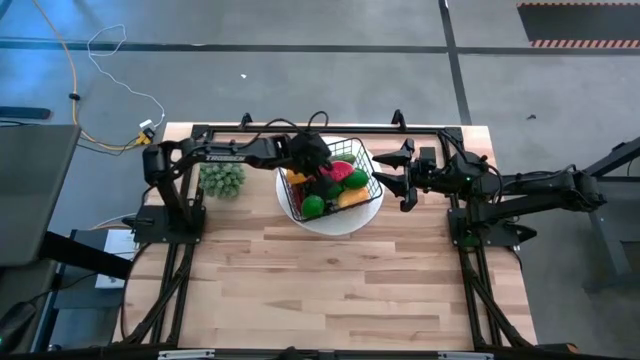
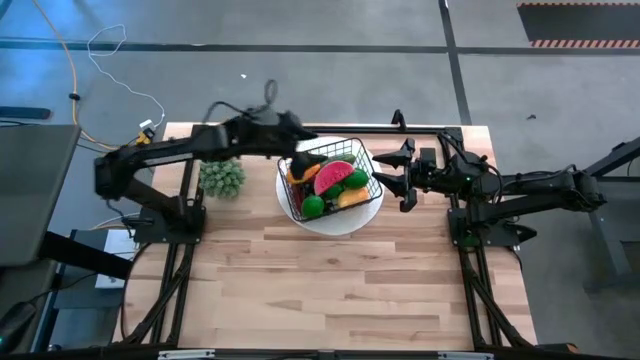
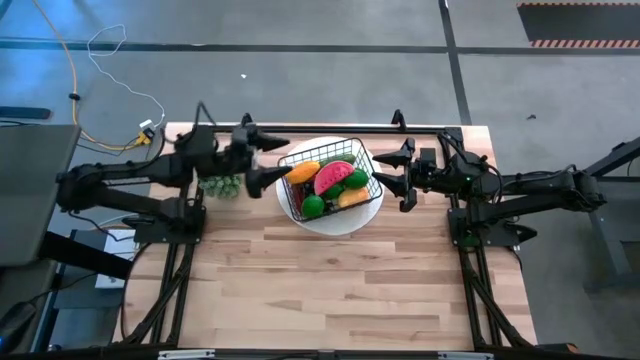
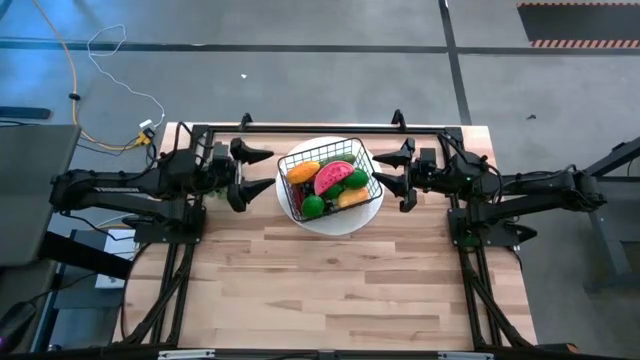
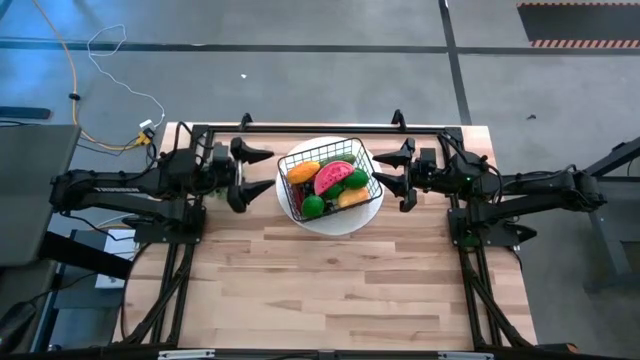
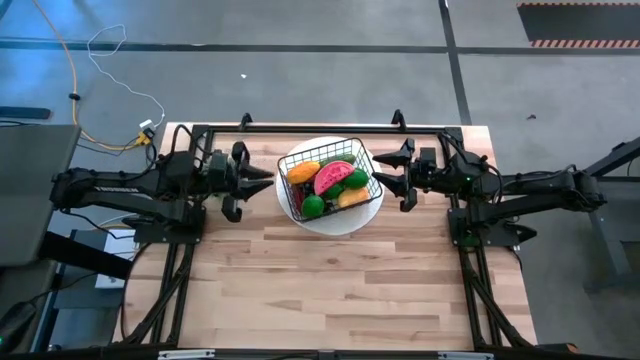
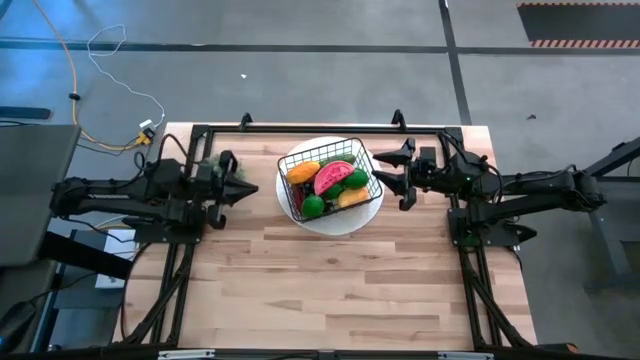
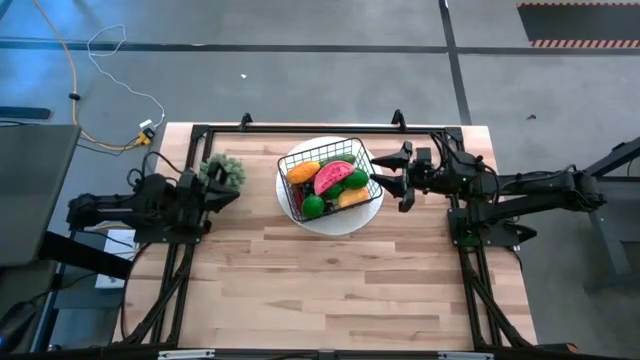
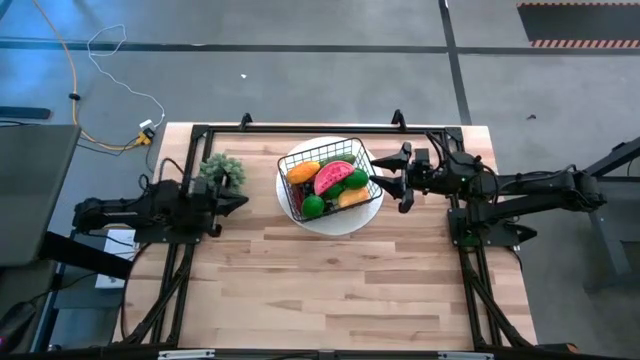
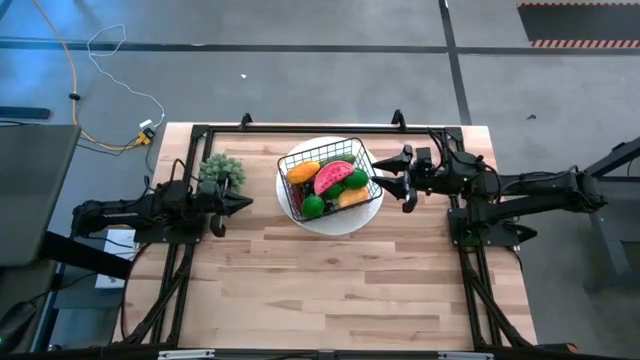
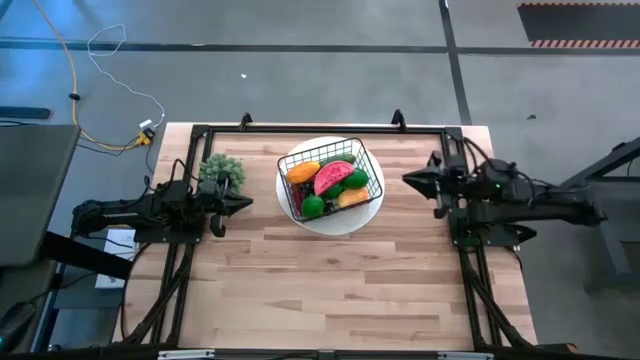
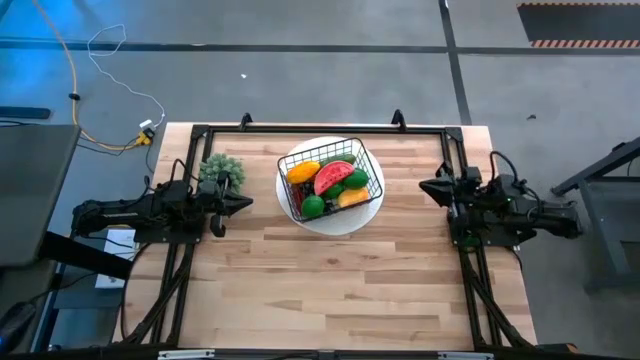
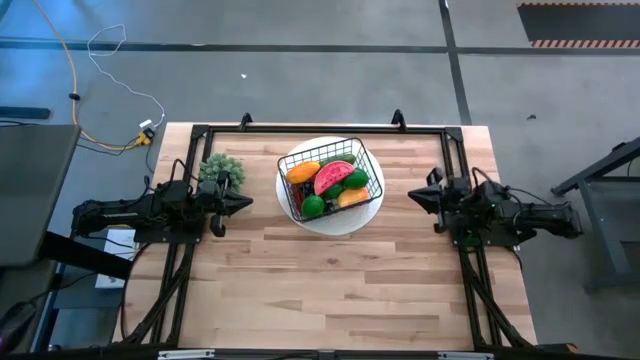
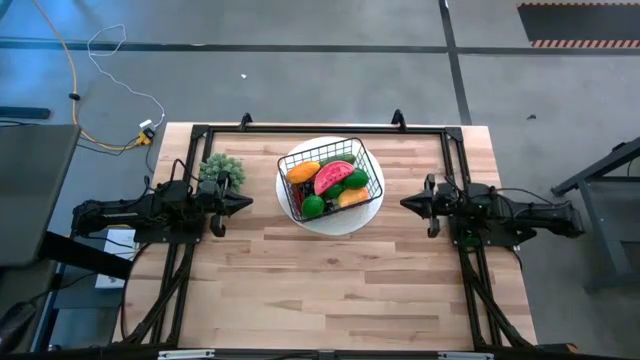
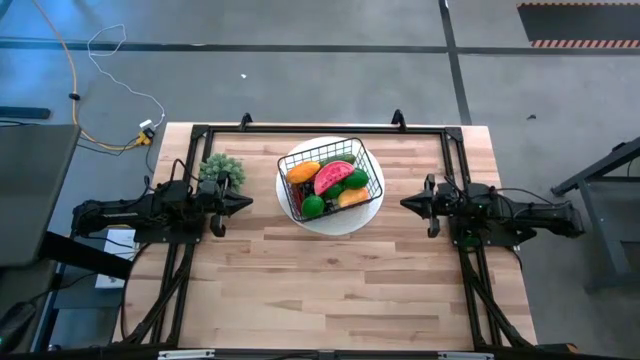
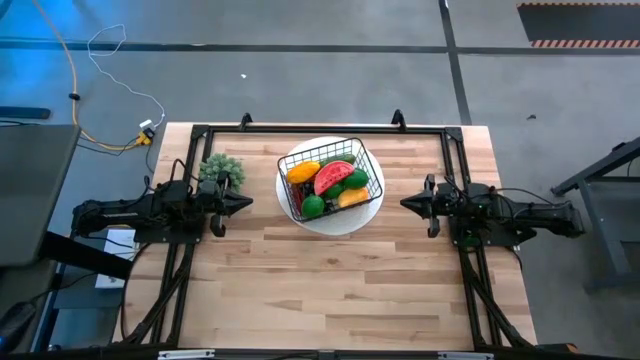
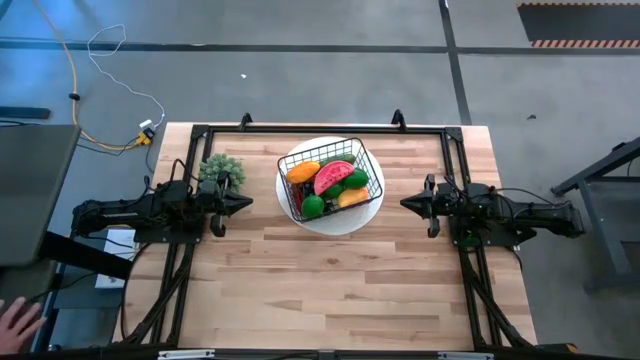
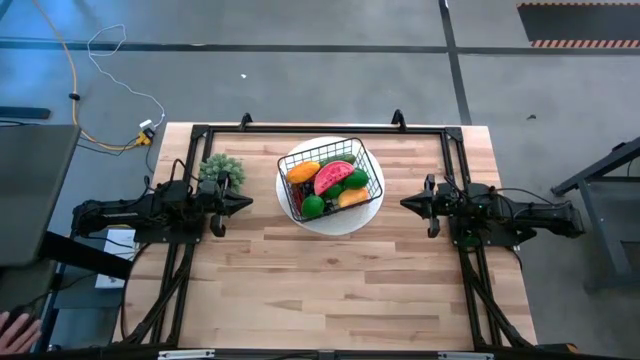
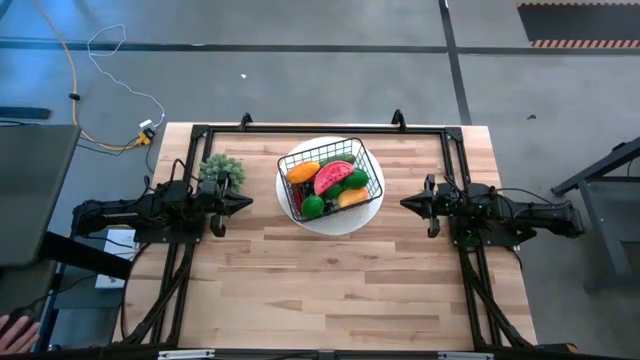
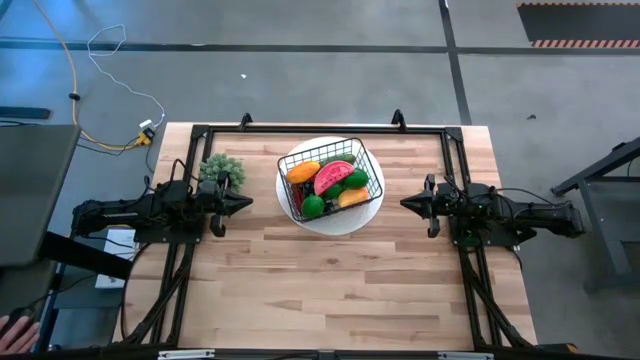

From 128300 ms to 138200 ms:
Task: Build produce basket
Return to Home Position

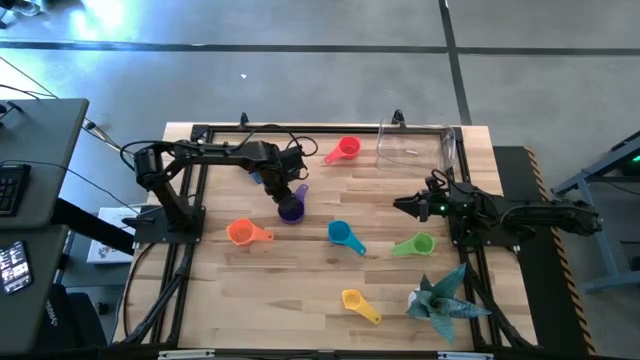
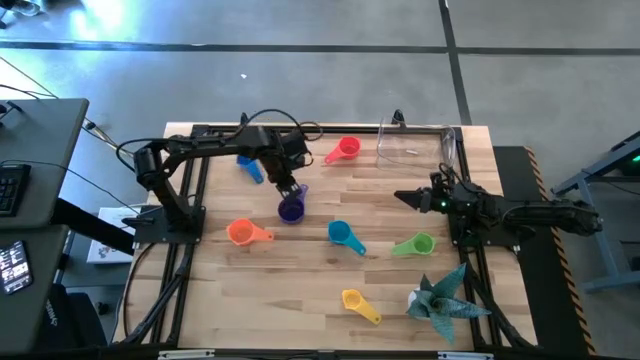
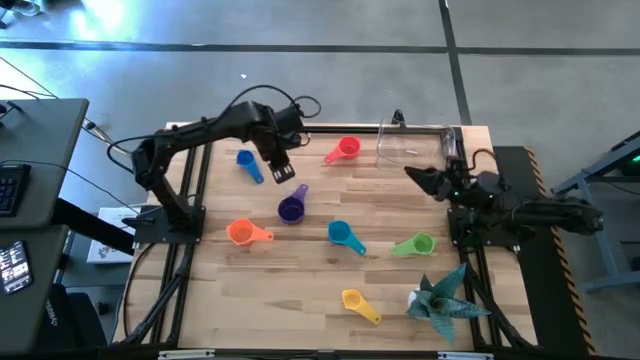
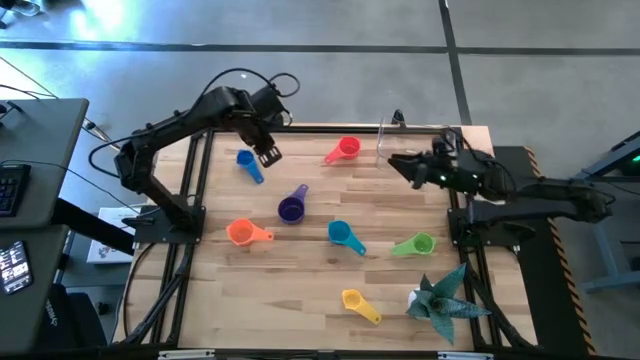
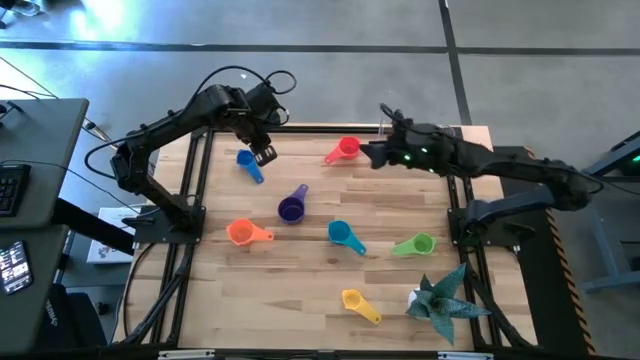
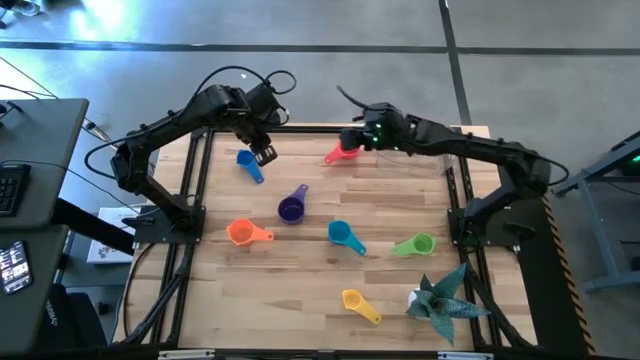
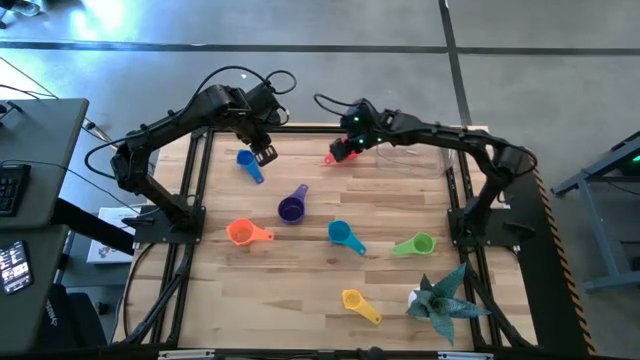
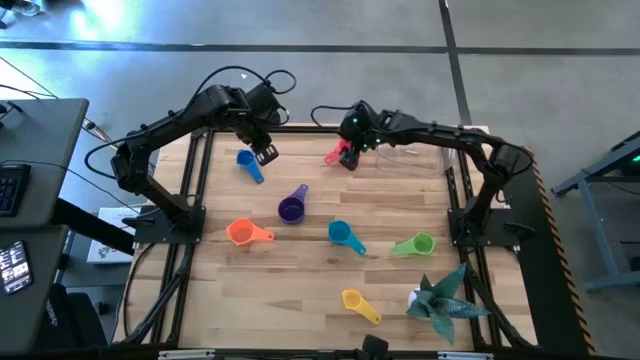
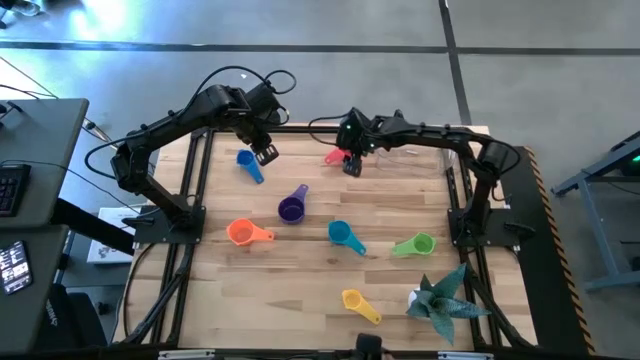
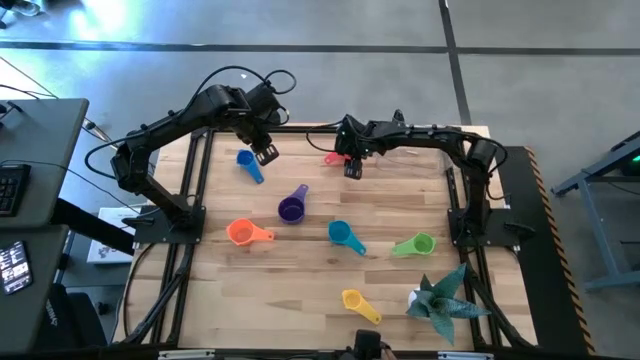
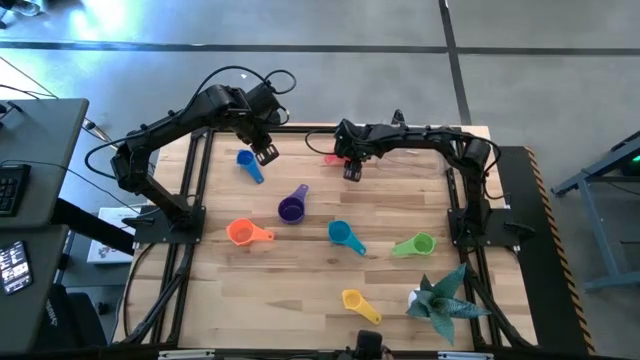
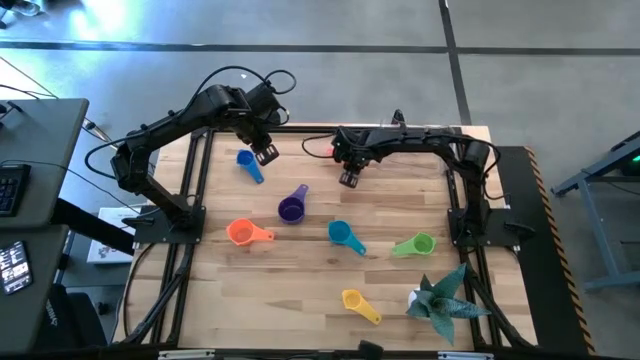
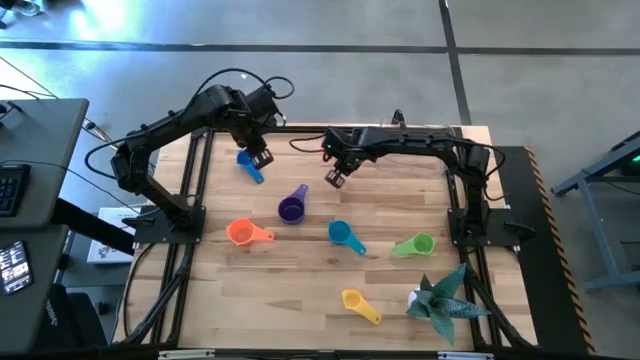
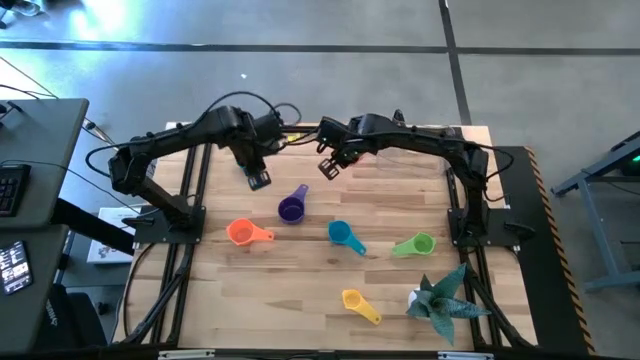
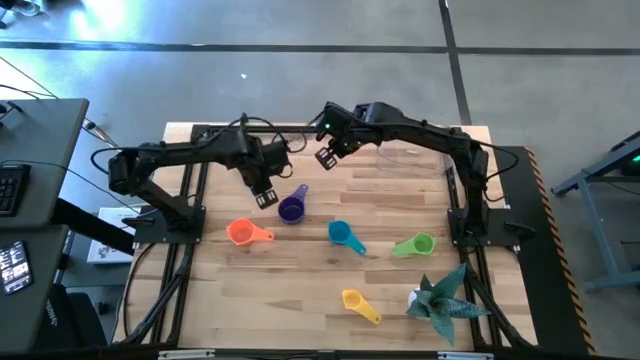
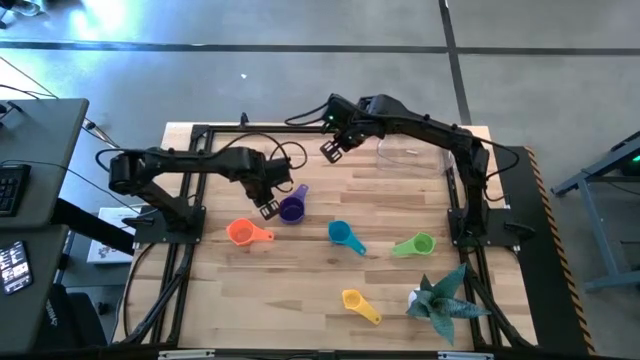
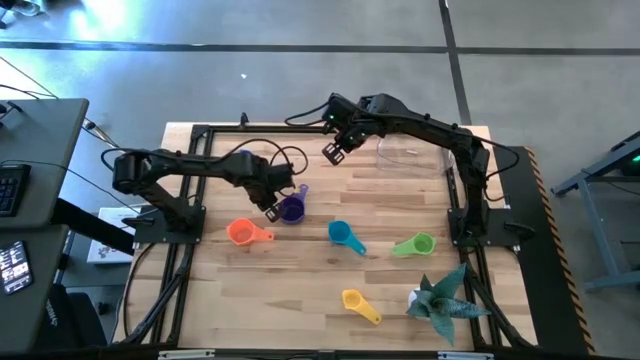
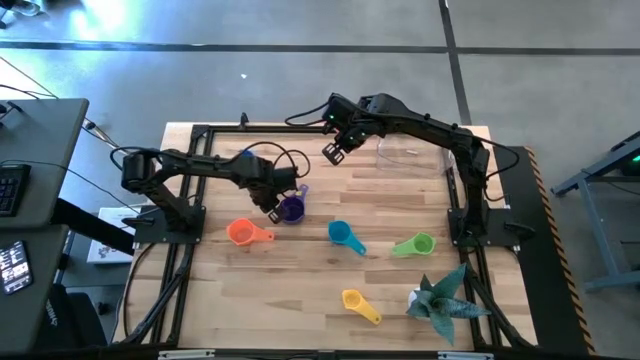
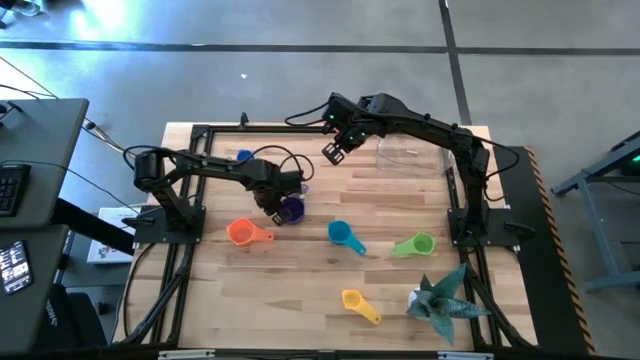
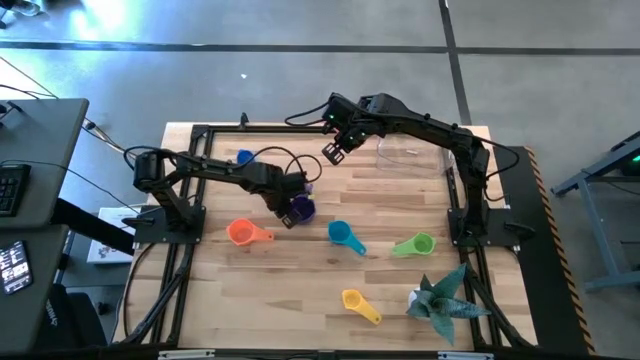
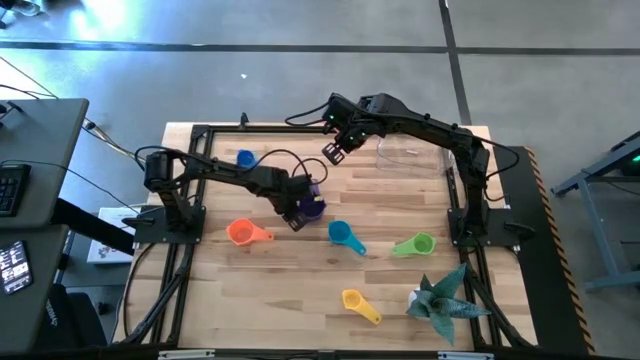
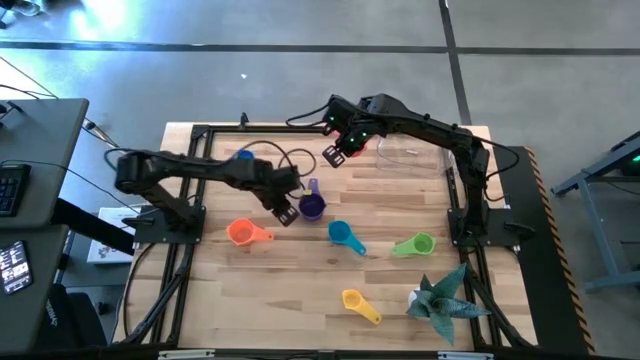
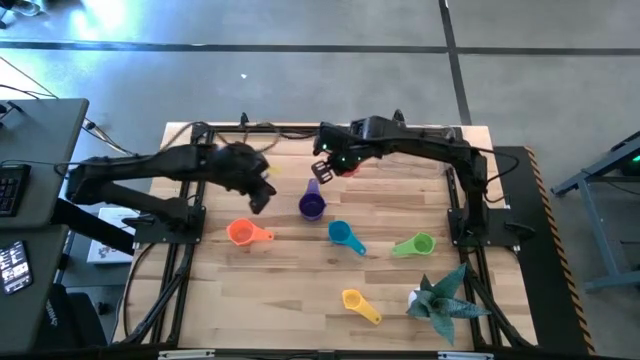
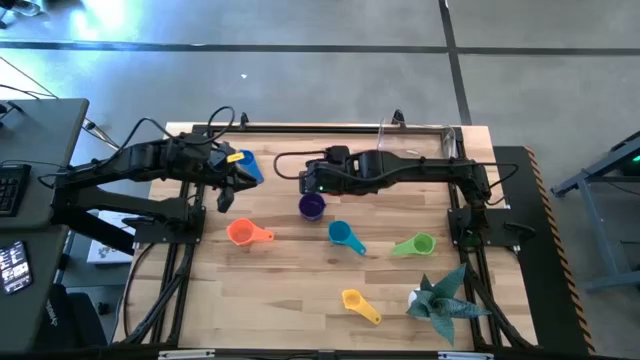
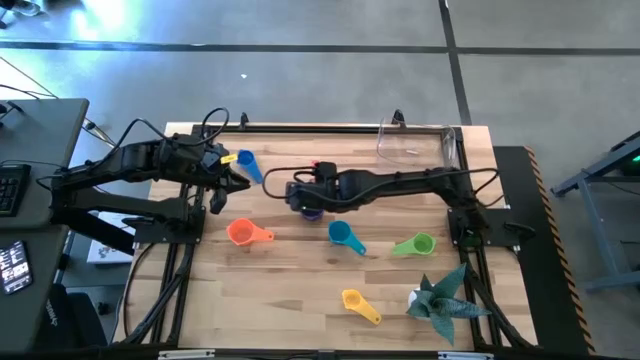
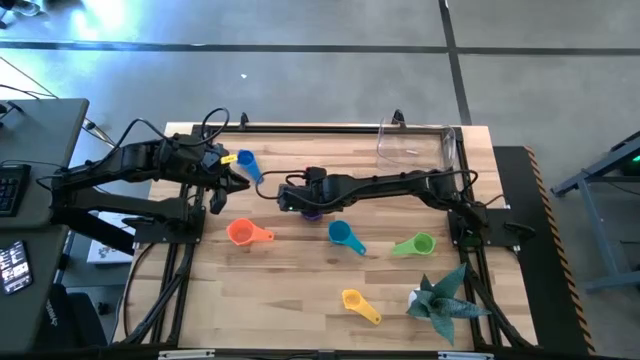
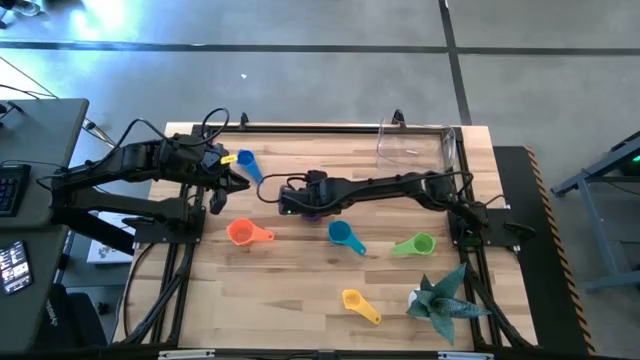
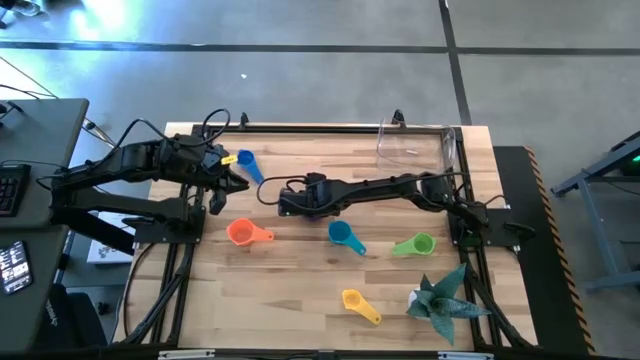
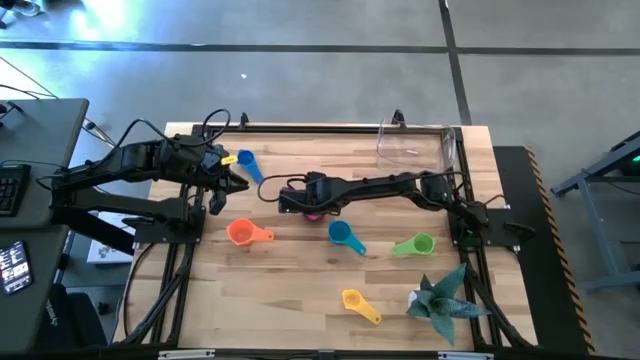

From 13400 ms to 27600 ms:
Task: Nest measuring cups in basket
Stack the red measuring cup on top of the purple measuring cup
